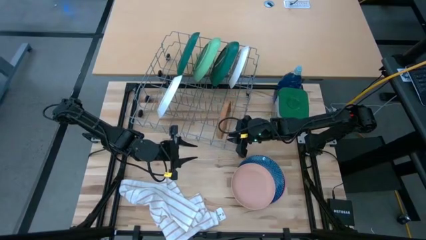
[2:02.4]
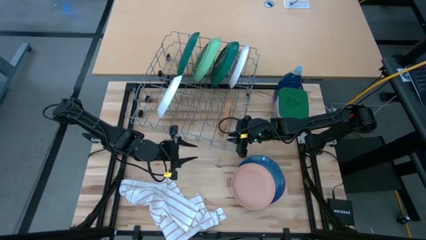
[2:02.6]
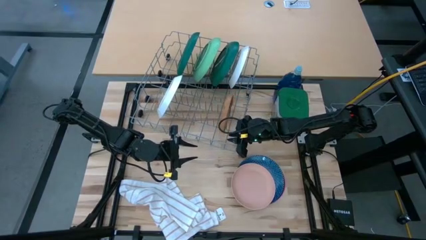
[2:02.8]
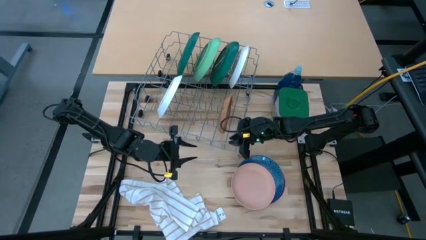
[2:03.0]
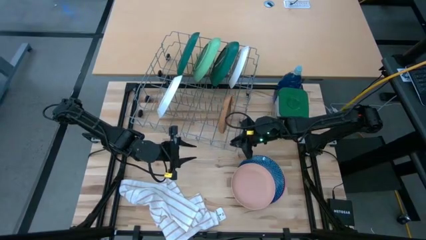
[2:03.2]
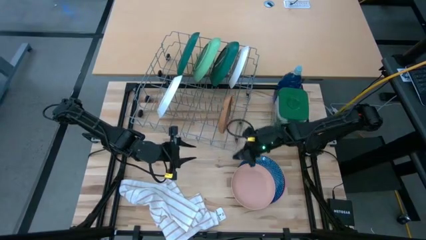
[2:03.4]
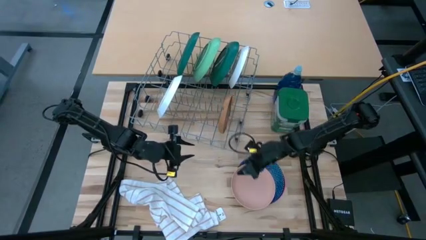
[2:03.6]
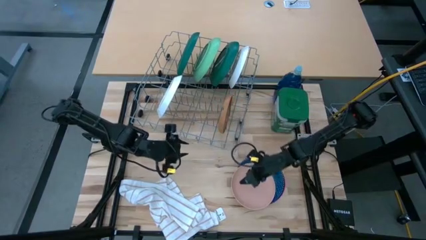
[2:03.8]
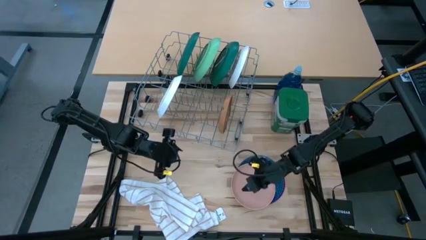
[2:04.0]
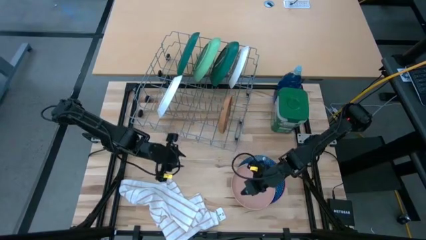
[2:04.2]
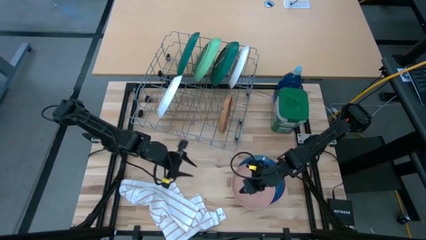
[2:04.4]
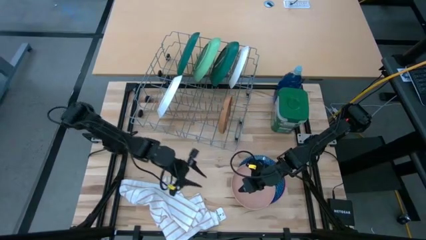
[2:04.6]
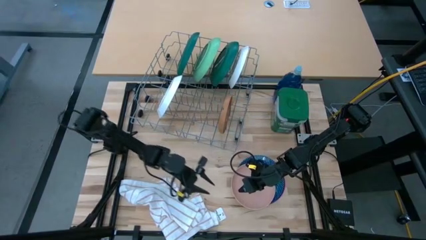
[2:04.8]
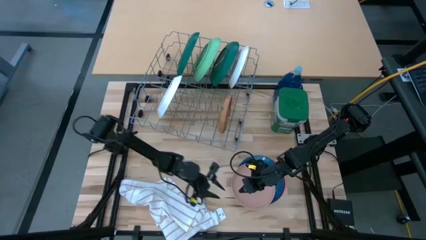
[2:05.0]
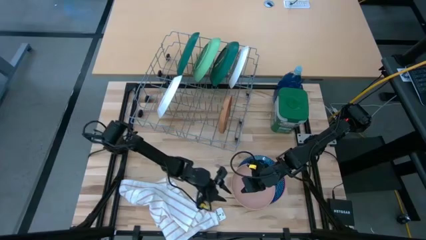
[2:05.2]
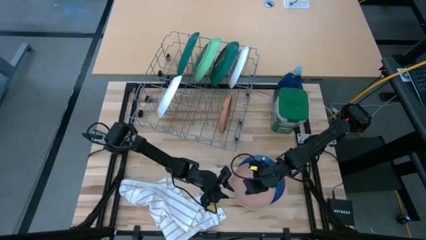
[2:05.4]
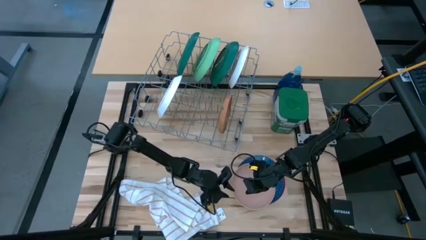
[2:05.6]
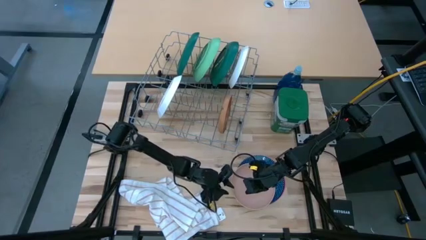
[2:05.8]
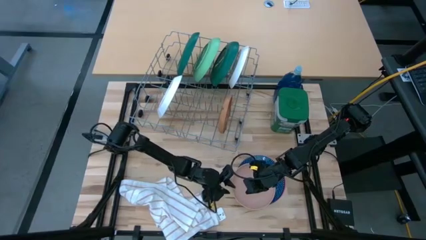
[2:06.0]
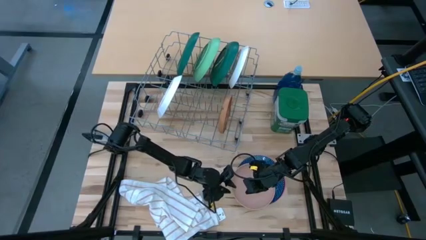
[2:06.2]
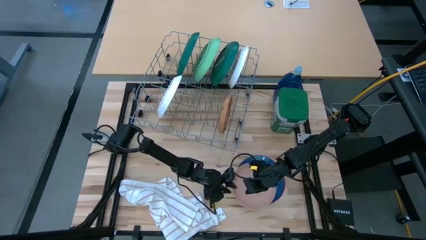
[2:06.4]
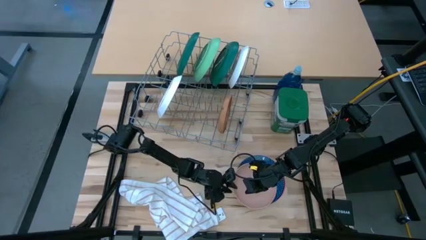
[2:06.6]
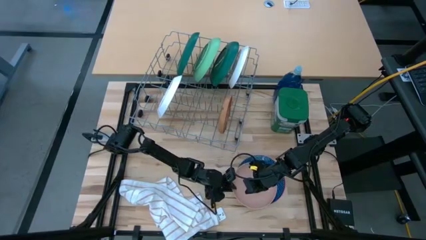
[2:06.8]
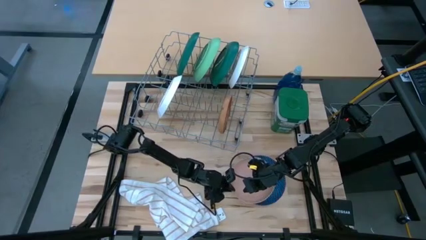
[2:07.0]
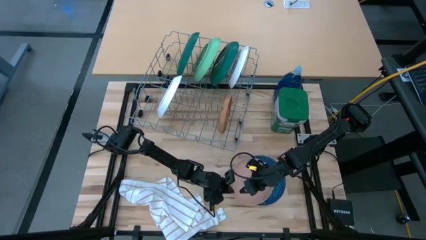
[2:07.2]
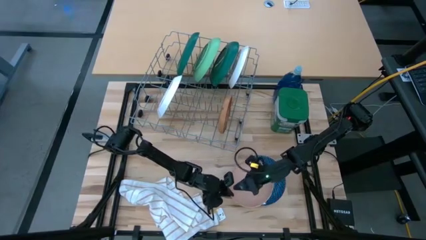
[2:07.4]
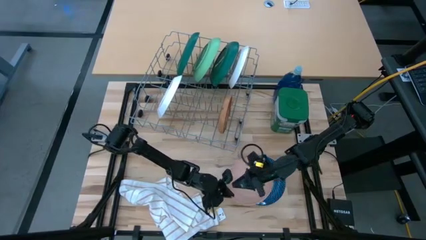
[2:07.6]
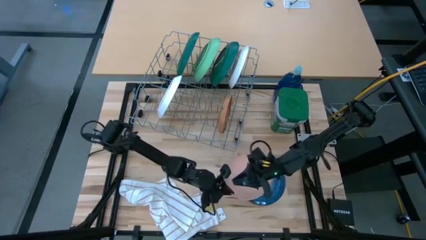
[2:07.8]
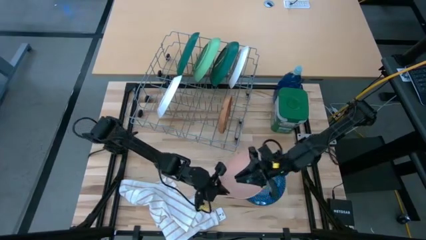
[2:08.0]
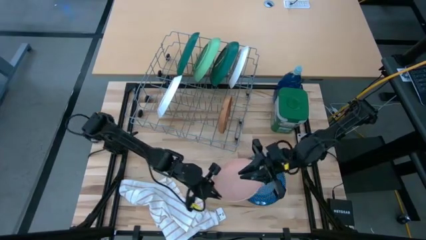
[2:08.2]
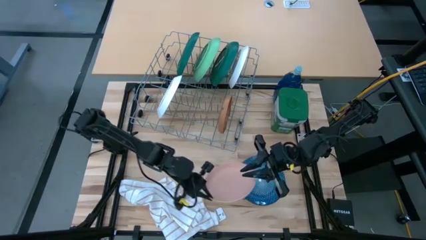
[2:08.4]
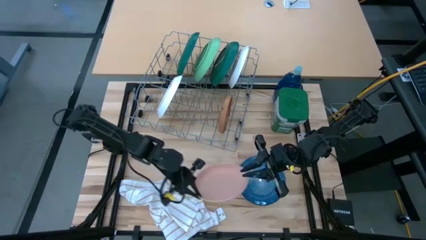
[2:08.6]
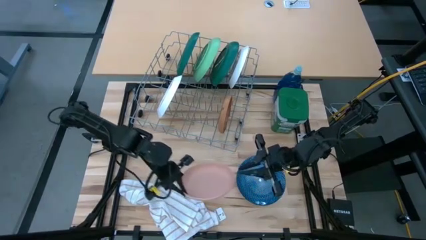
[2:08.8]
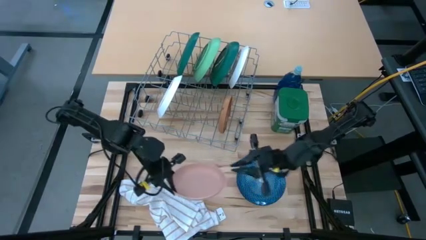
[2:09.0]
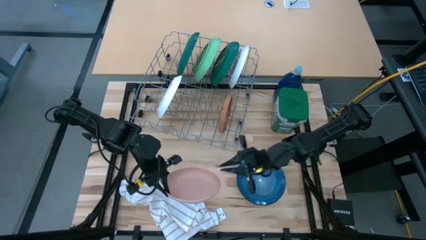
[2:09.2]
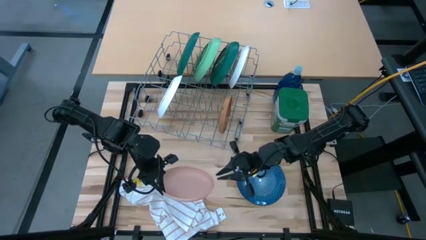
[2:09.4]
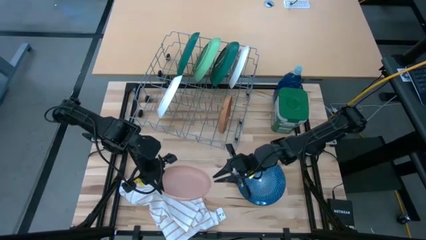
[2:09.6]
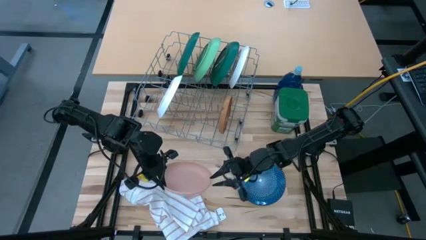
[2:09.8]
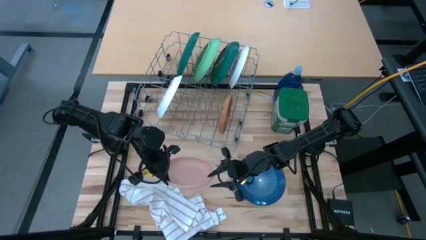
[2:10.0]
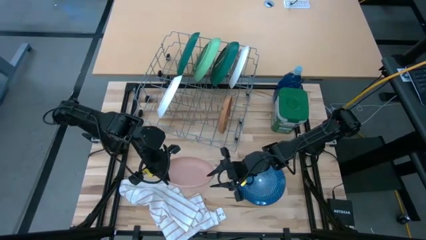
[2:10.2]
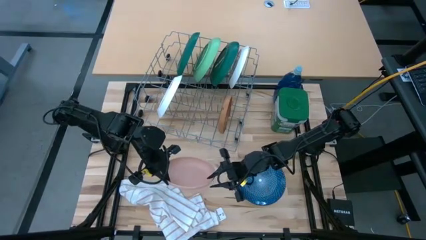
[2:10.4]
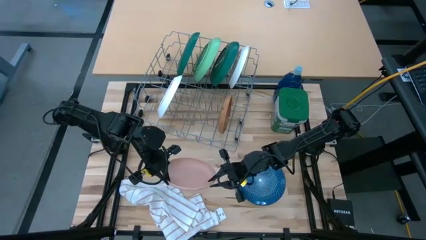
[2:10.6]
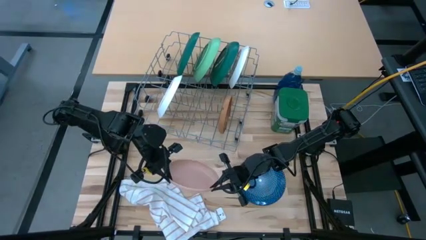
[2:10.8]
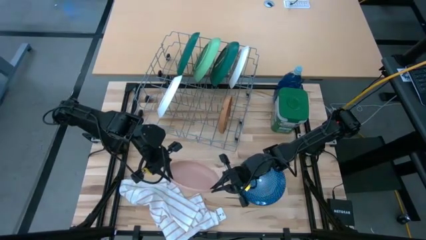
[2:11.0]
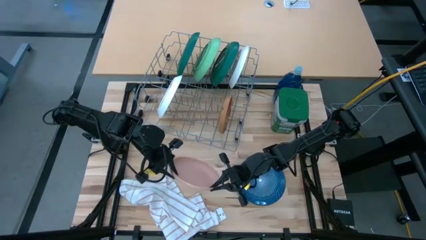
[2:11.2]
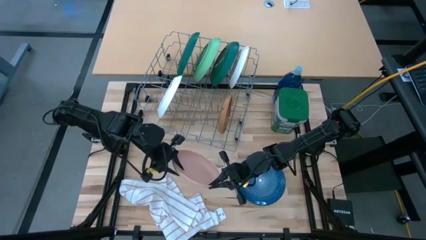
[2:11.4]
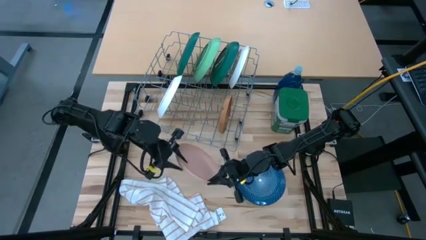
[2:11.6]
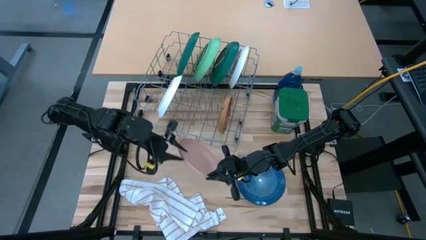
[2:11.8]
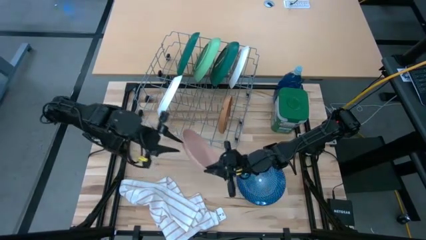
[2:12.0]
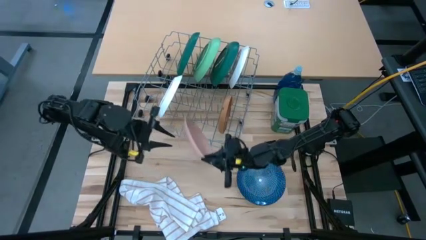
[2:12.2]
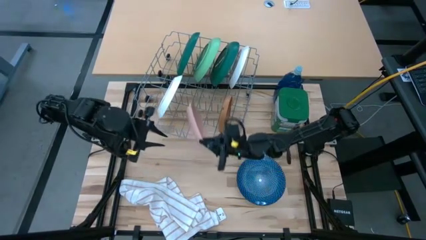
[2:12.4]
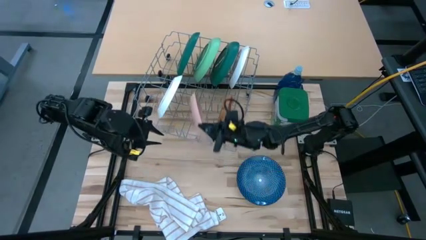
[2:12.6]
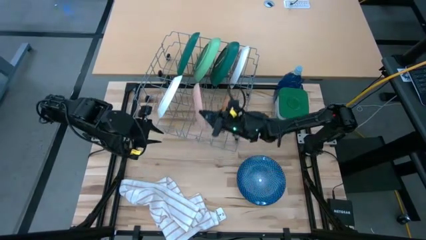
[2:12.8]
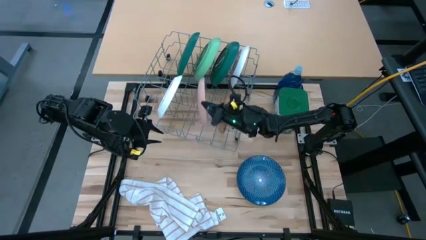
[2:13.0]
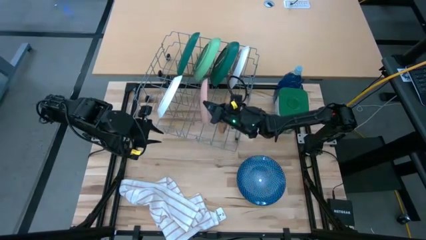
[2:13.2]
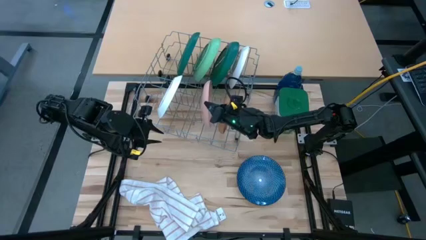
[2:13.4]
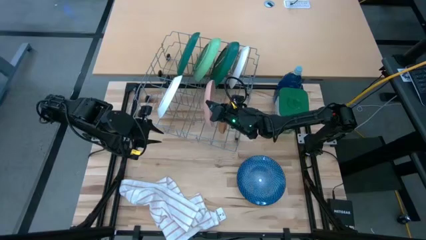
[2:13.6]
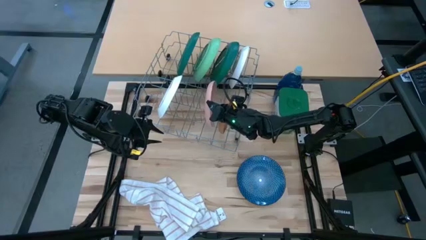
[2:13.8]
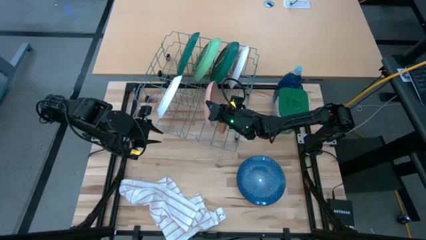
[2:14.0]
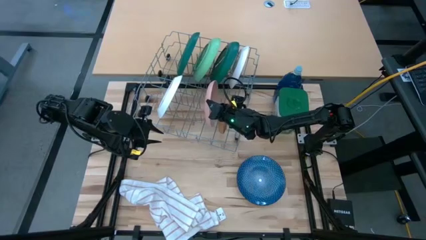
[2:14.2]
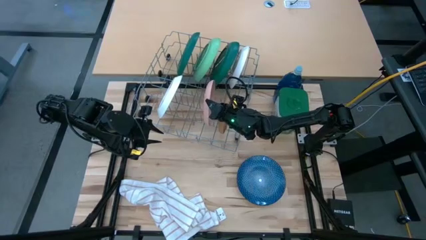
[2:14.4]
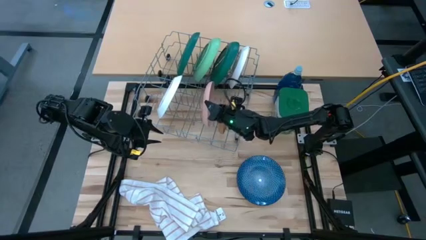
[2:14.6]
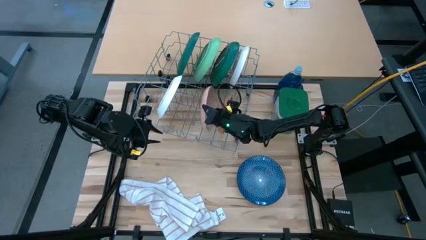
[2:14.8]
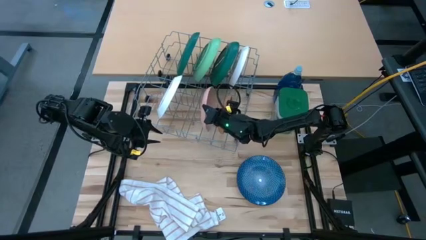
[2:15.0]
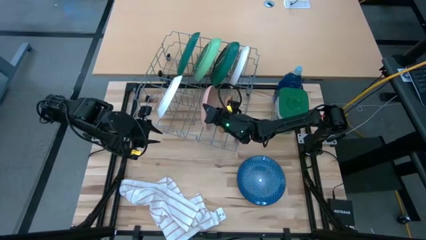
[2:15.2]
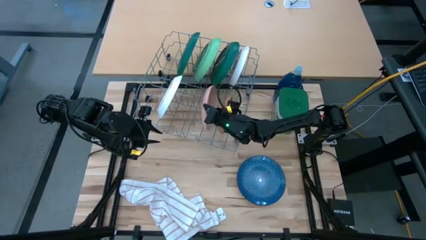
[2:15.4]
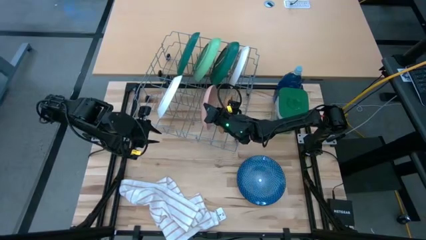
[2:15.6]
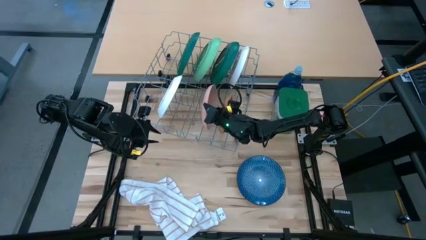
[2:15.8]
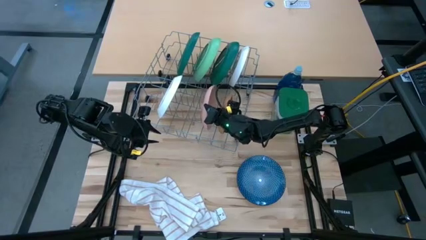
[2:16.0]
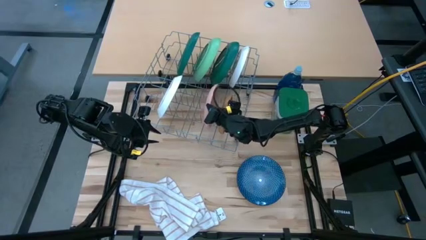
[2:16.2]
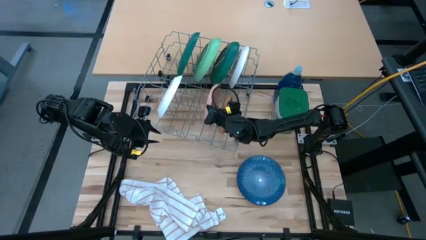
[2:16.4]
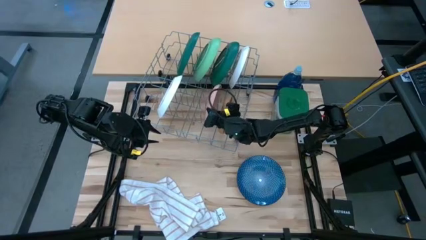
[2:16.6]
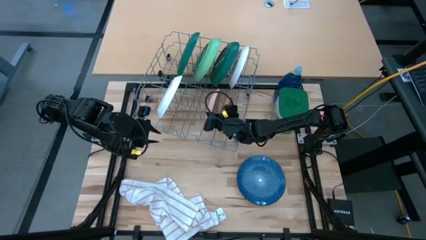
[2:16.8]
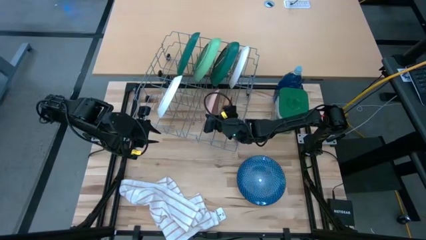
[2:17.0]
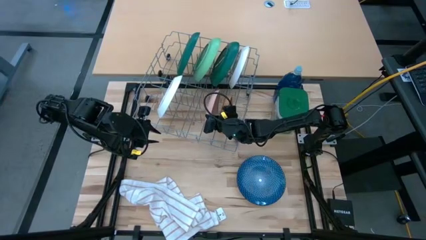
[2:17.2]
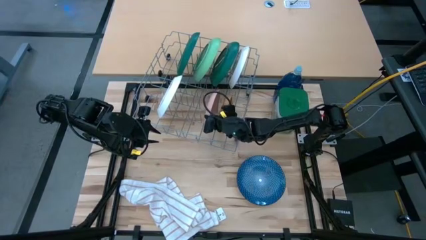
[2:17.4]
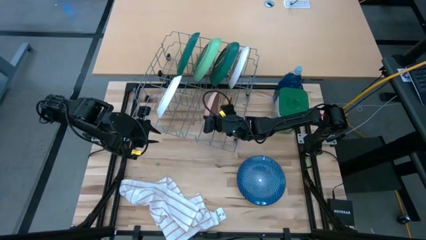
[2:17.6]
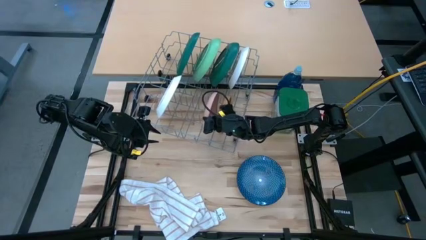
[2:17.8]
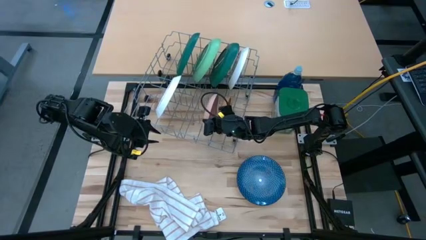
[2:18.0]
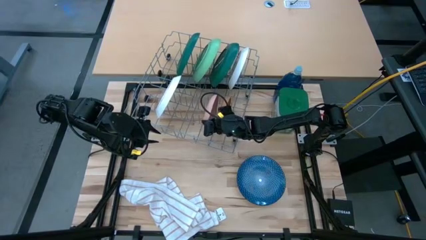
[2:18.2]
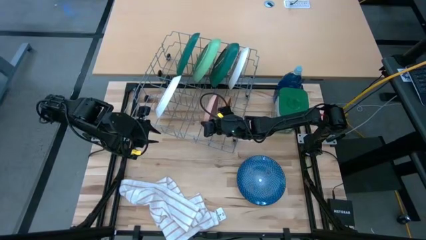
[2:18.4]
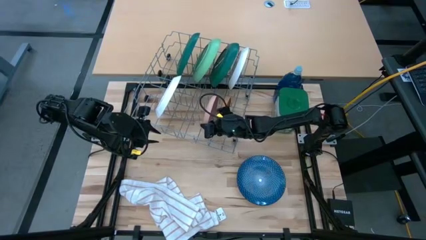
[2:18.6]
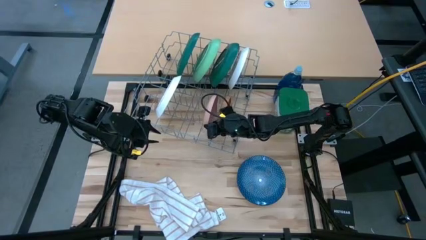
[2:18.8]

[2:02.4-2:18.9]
Task: Sort dishes
Put the light pink plate in the dish rack
